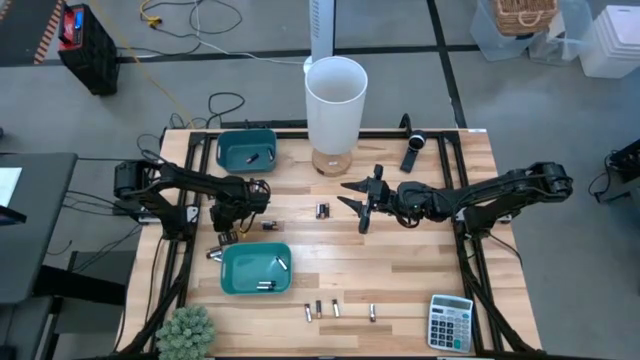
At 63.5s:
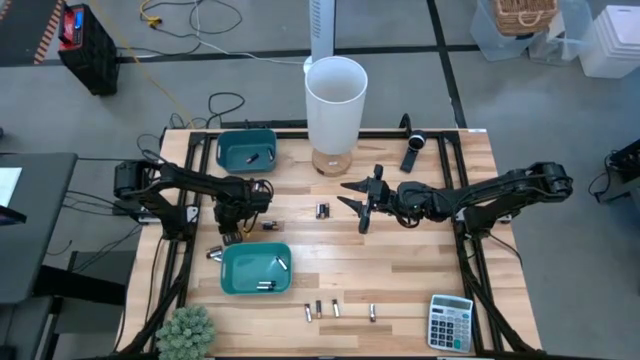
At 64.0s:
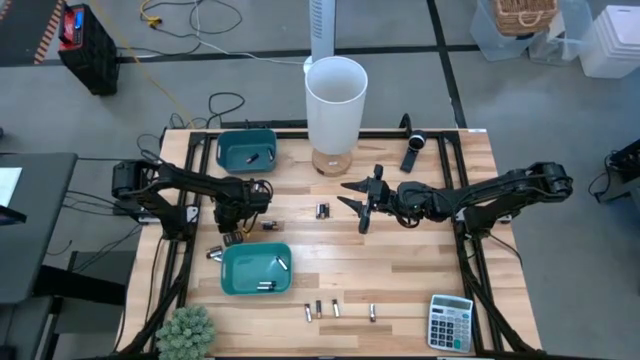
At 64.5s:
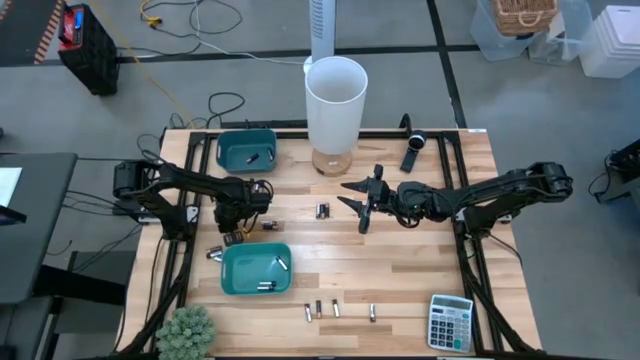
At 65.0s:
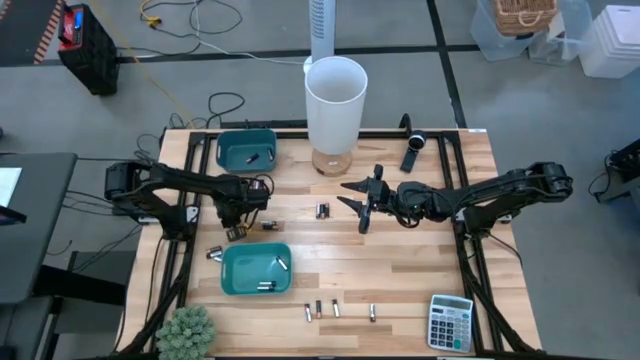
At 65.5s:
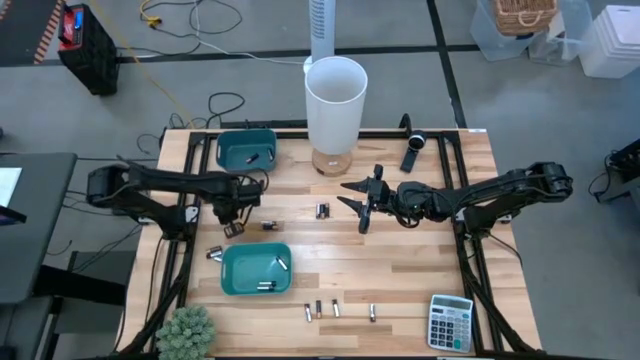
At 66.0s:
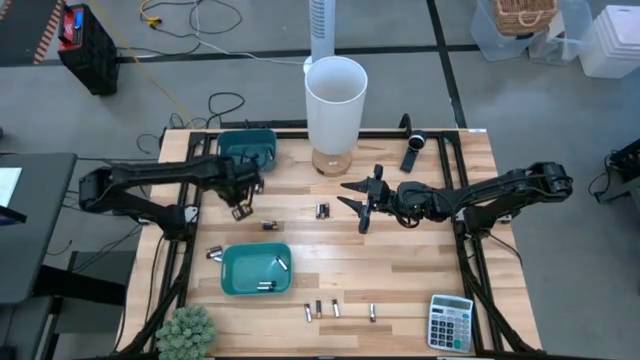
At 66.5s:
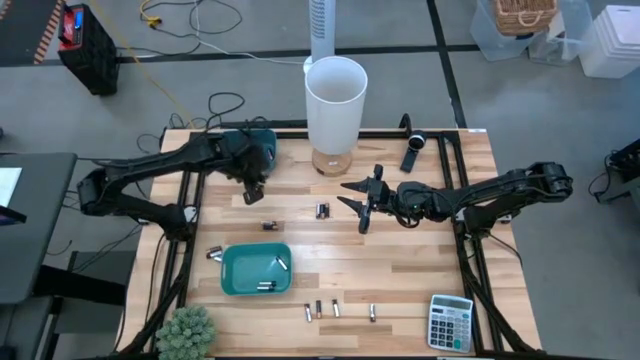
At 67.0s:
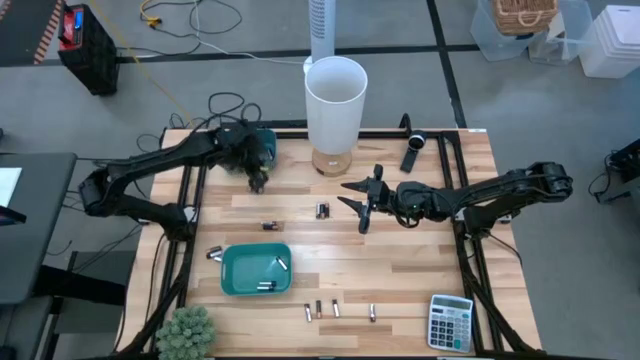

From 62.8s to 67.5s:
Task: Sort batteries
Put the black battery into the blue bin

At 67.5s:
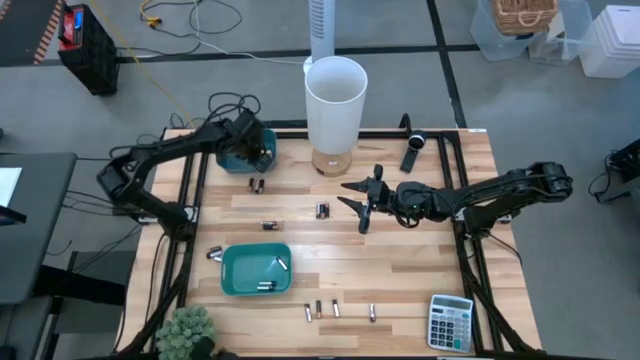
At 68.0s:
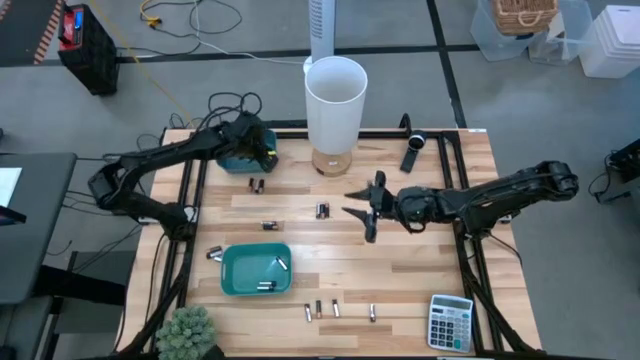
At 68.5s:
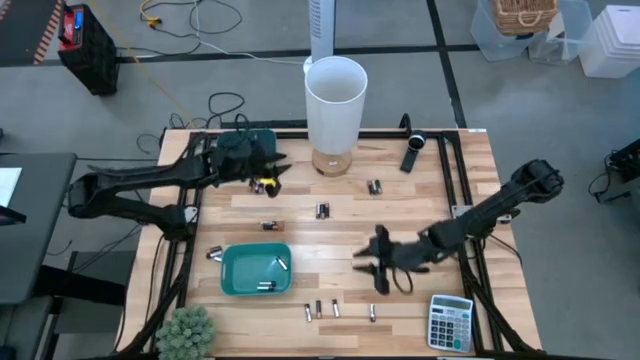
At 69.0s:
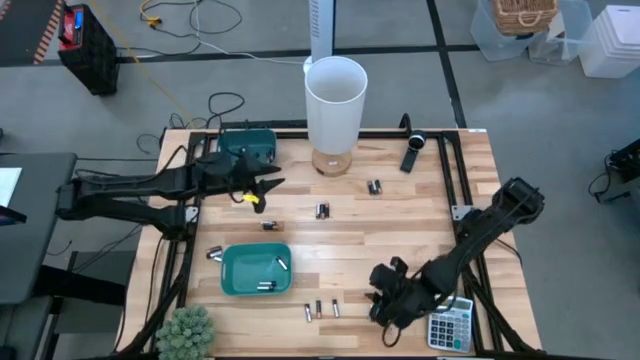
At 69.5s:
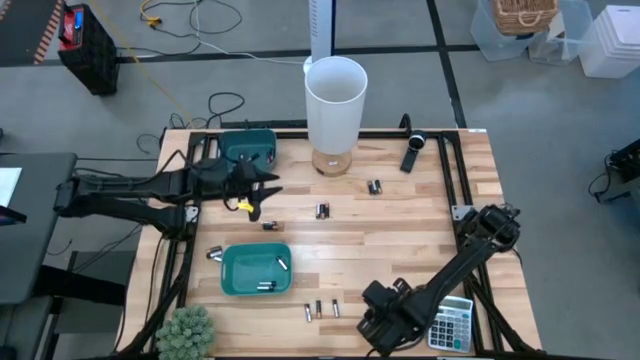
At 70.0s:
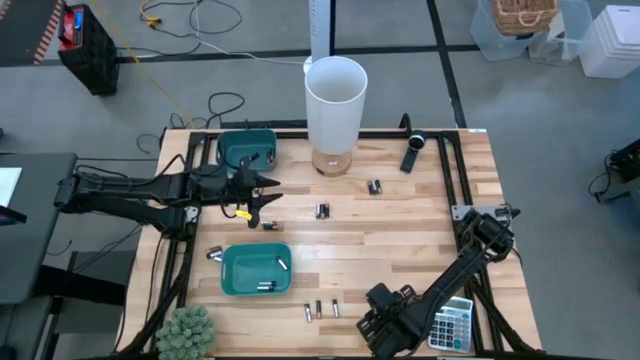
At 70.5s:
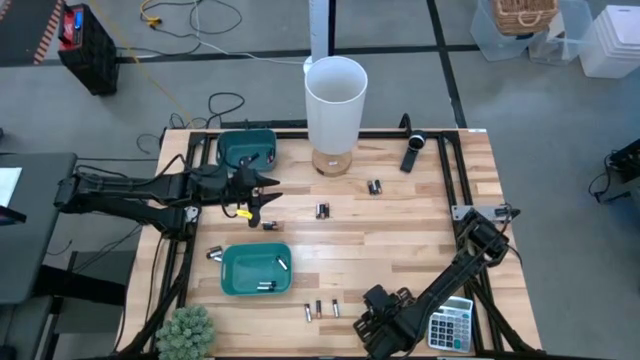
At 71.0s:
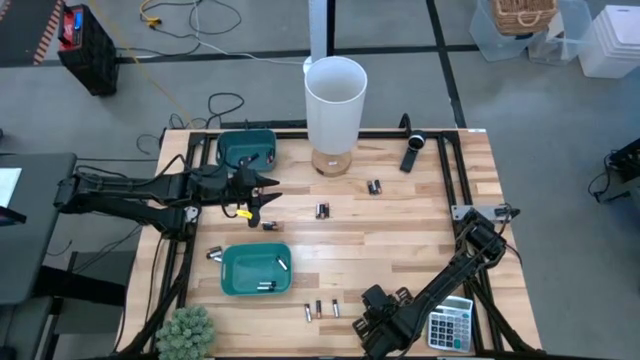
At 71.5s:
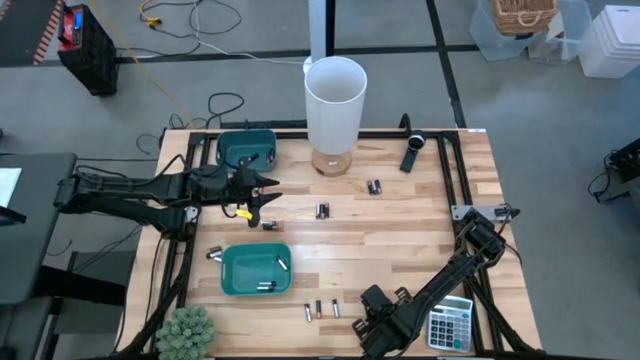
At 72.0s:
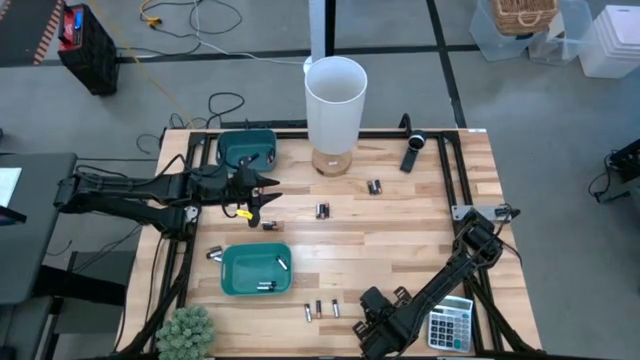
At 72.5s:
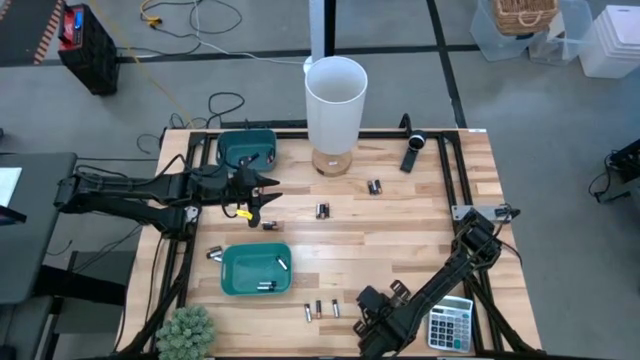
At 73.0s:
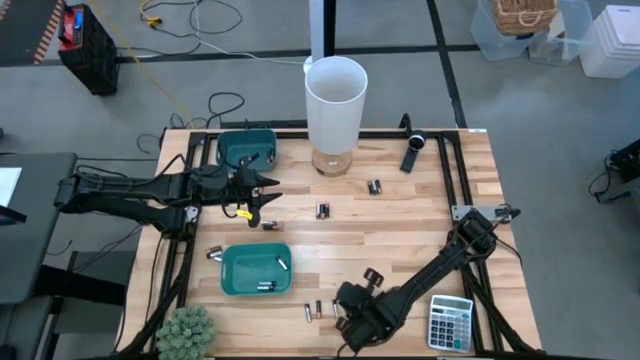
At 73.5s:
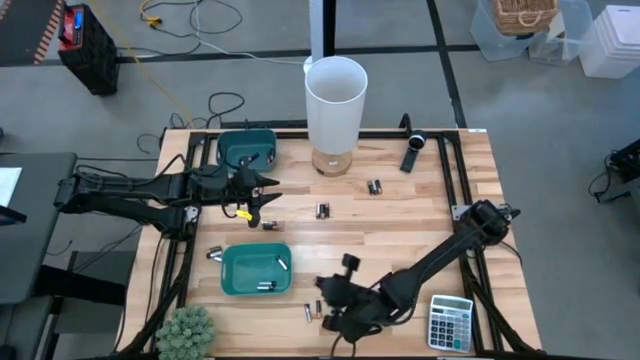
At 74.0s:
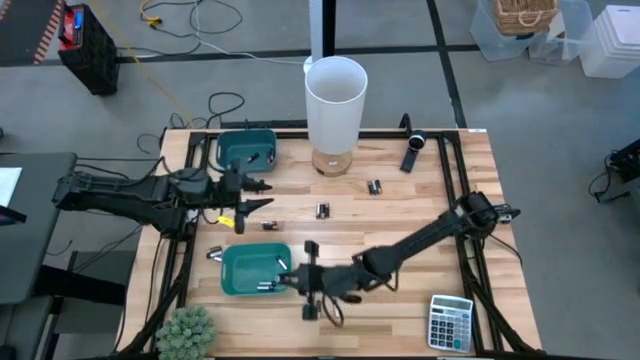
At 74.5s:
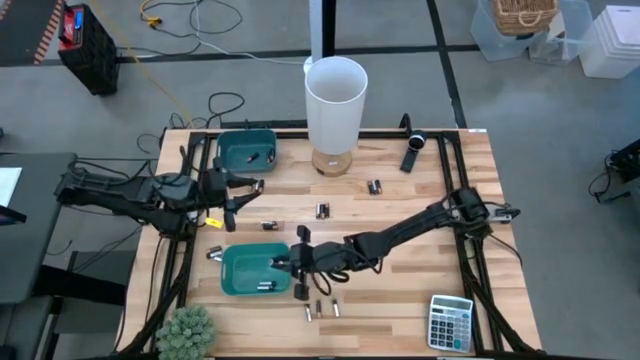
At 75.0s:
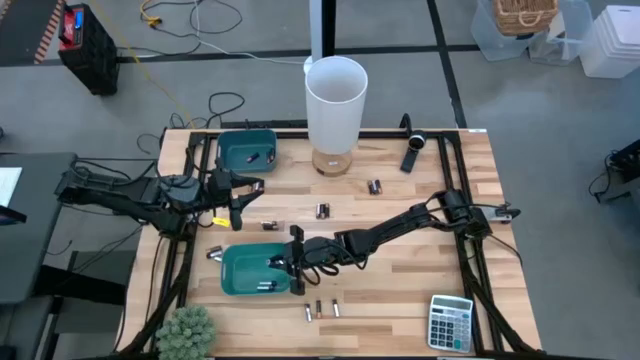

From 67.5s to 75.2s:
Put the silver battery into the green bin

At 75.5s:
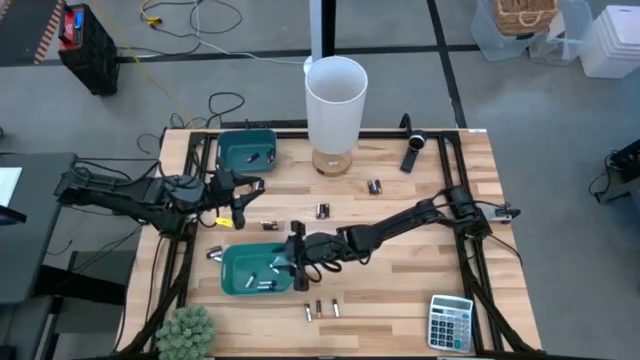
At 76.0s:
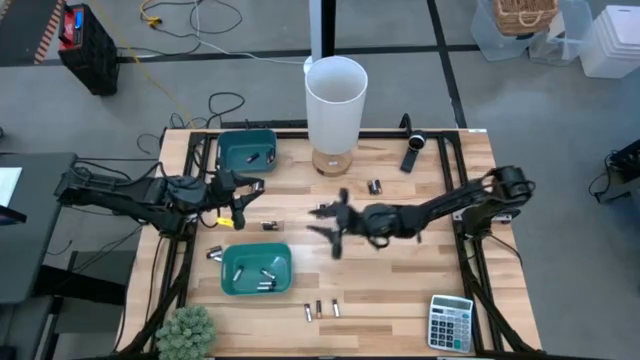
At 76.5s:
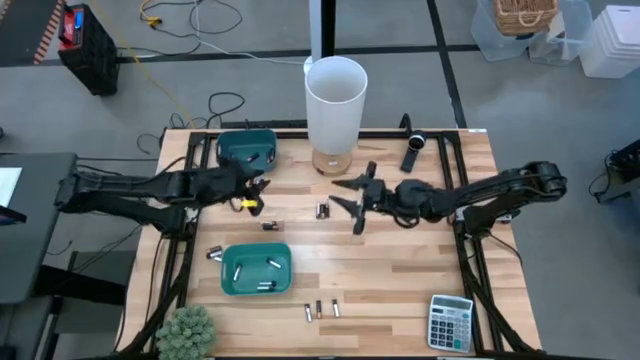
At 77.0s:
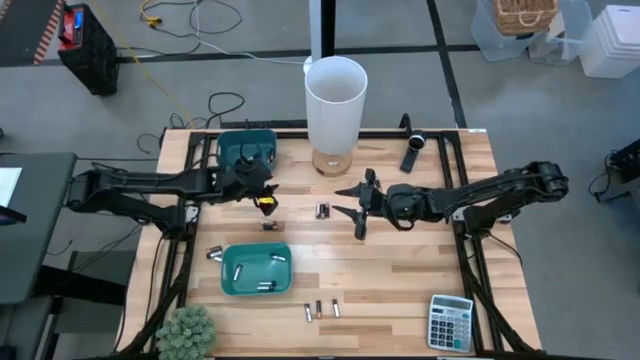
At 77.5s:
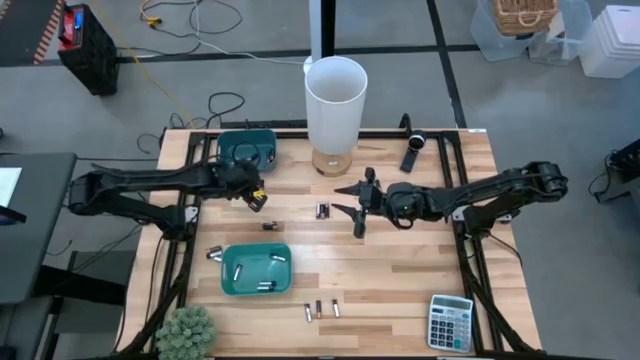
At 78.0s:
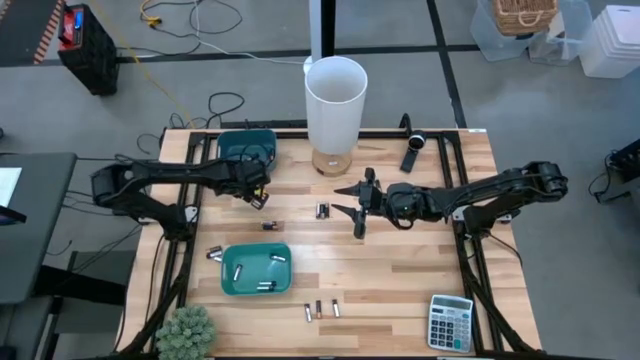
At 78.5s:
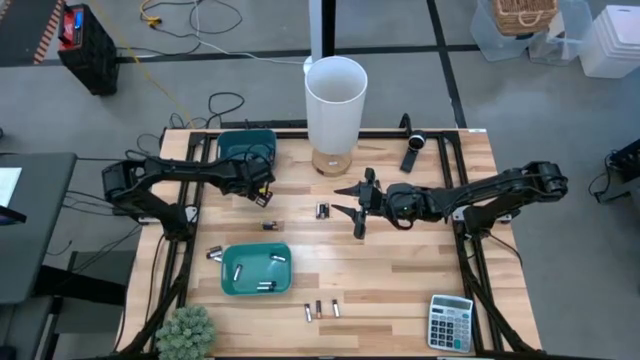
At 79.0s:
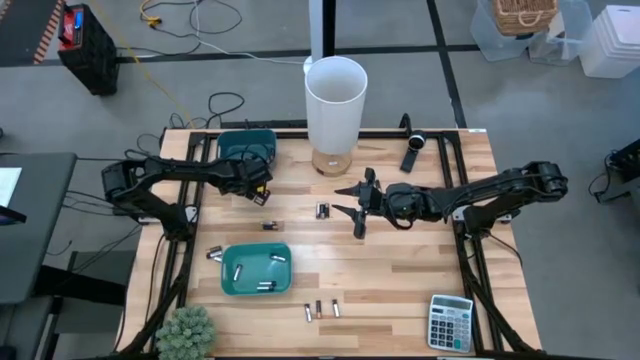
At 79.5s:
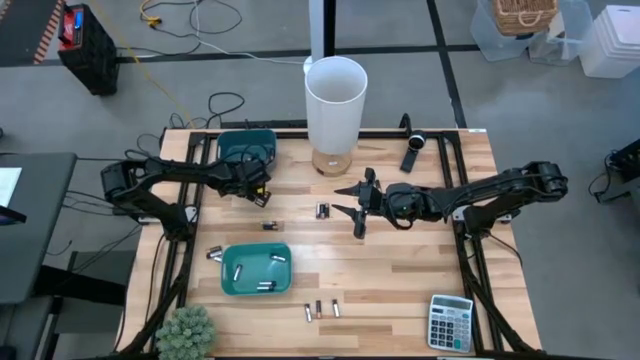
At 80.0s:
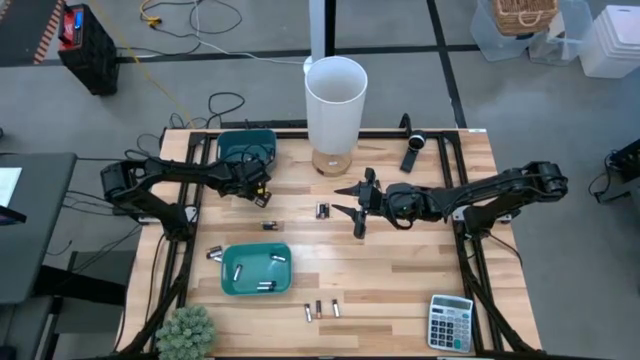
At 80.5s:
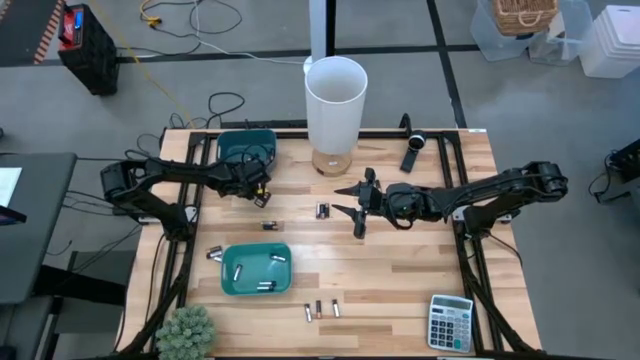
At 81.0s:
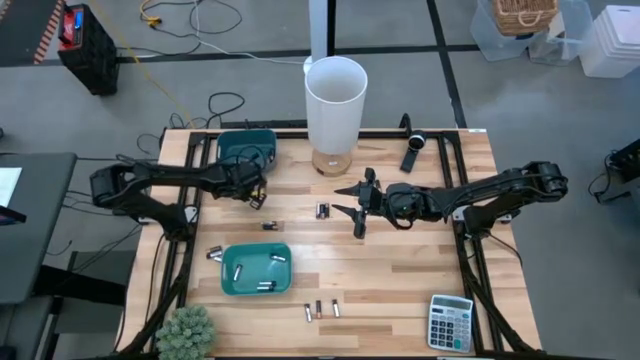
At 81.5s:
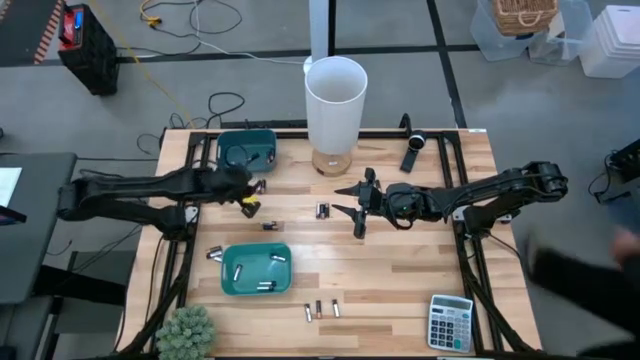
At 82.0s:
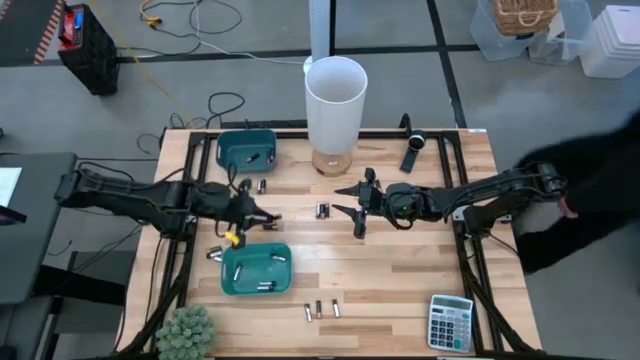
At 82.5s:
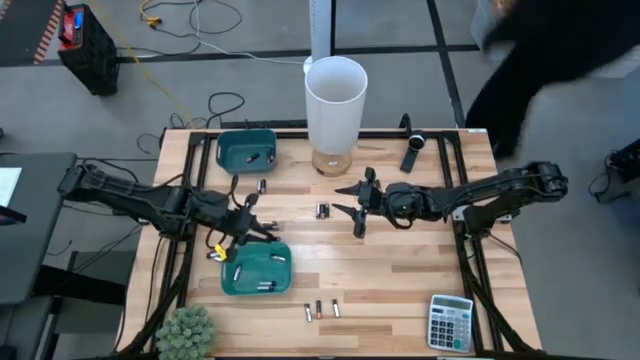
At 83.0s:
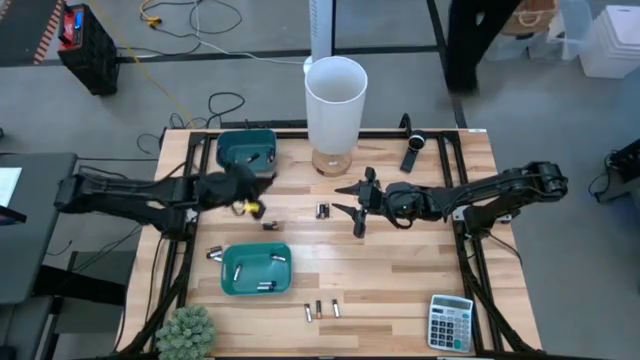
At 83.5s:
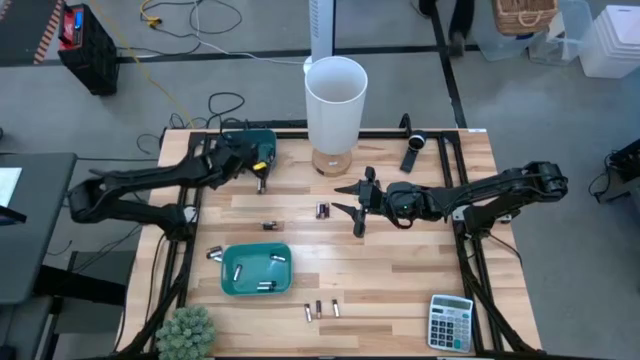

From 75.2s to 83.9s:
Put the black battery into the blue bin

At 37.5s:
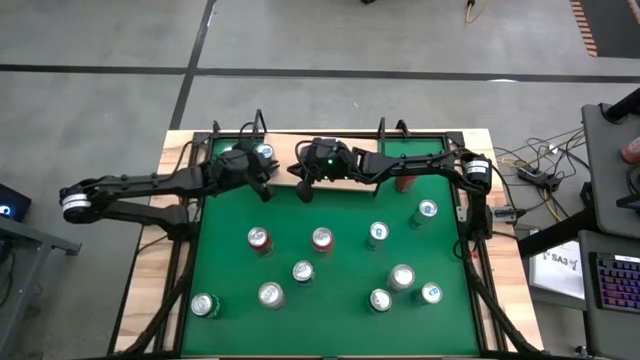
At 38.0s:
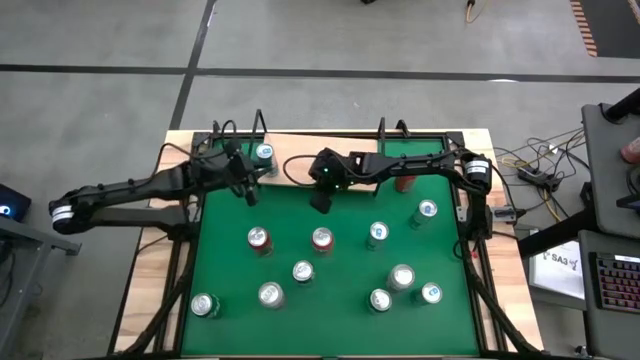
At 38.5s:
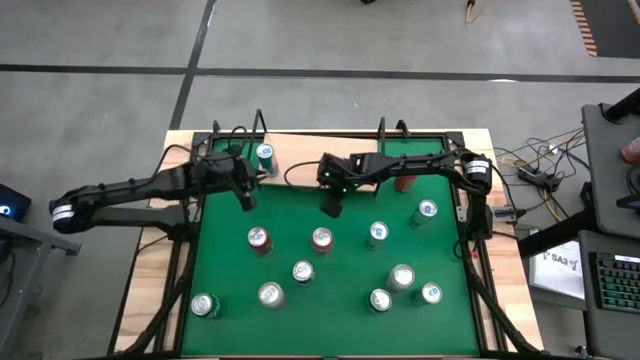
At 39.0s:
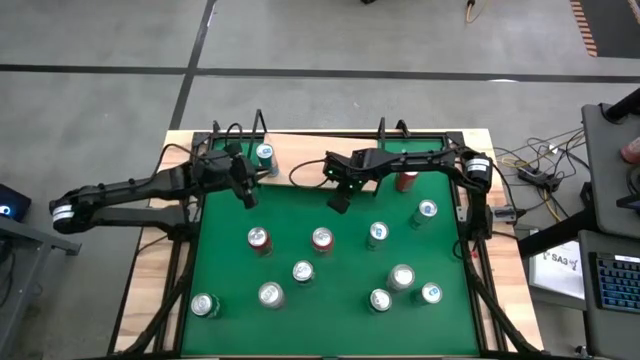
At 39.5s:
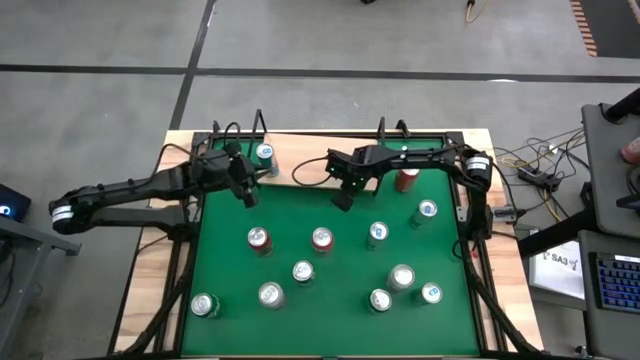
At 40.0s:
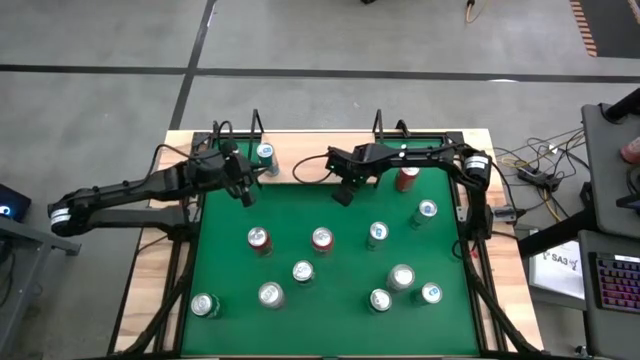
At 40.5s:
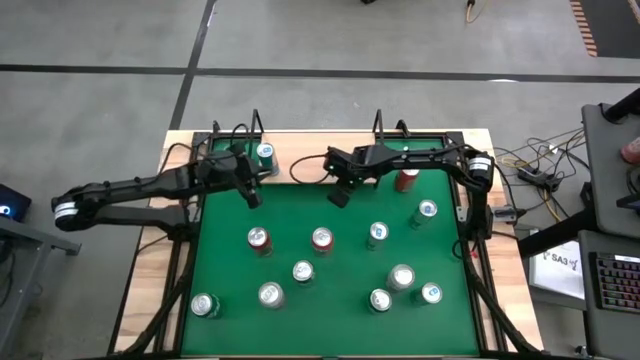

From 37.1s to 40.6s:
Task: Pick and place cans onto a shelf
Adjust the shelf
